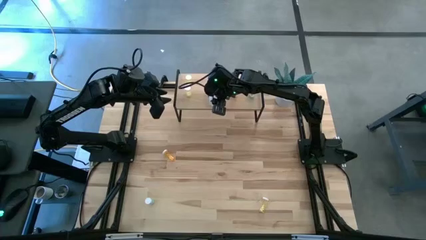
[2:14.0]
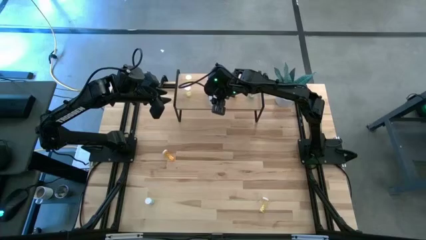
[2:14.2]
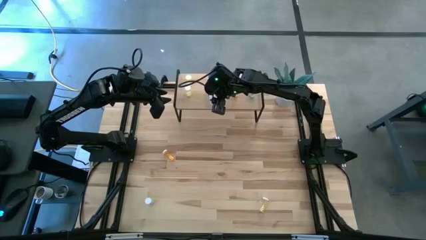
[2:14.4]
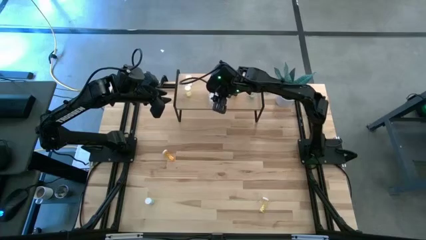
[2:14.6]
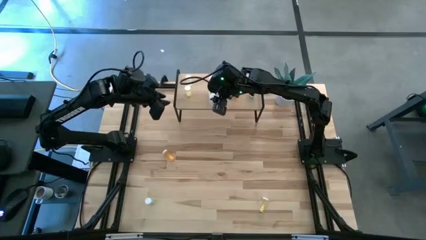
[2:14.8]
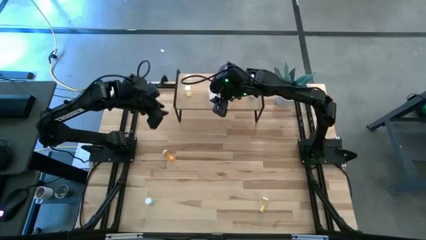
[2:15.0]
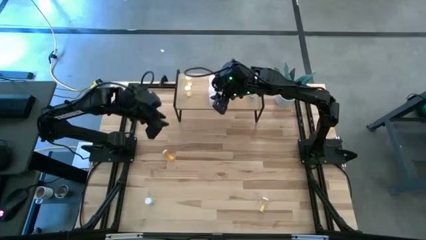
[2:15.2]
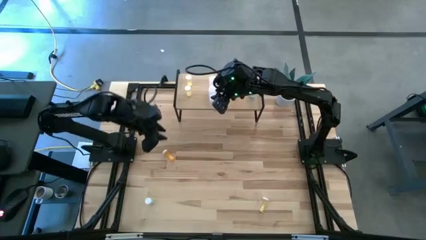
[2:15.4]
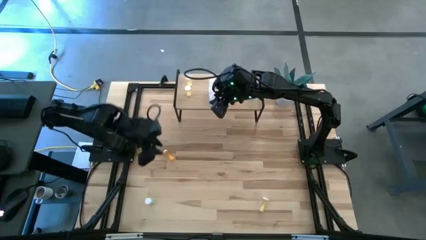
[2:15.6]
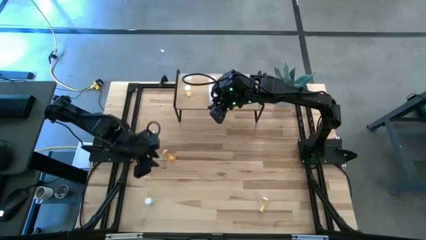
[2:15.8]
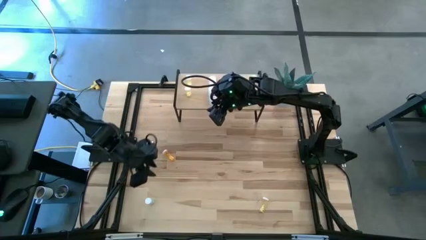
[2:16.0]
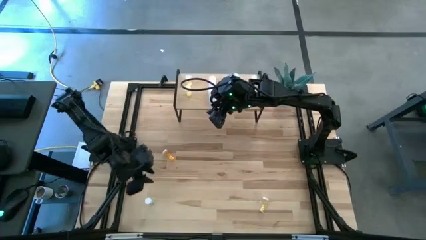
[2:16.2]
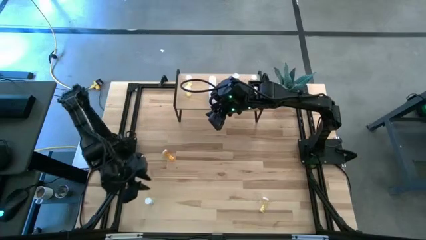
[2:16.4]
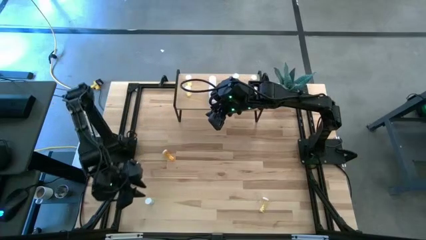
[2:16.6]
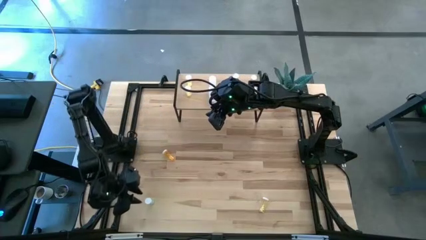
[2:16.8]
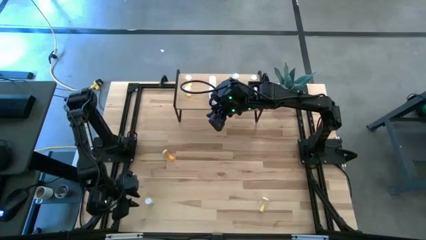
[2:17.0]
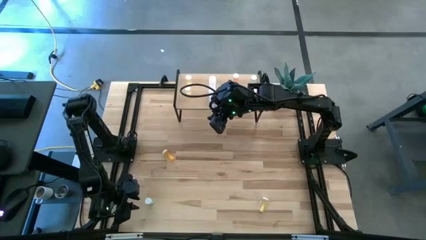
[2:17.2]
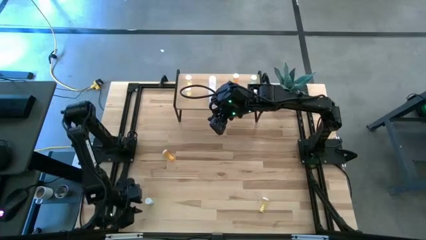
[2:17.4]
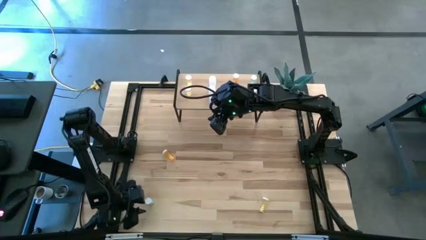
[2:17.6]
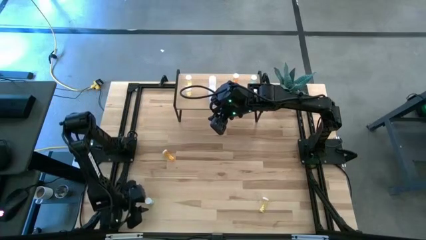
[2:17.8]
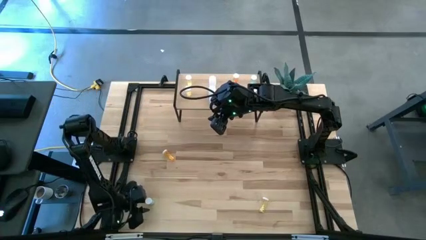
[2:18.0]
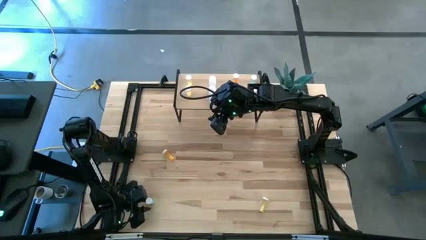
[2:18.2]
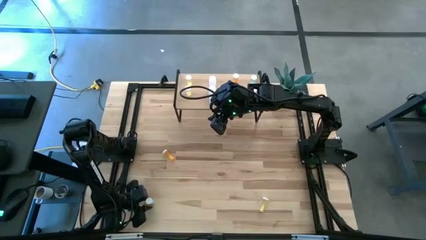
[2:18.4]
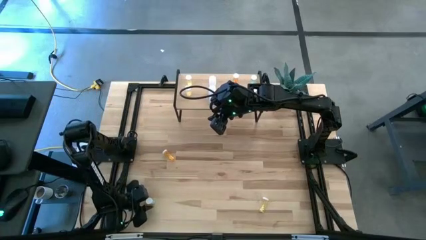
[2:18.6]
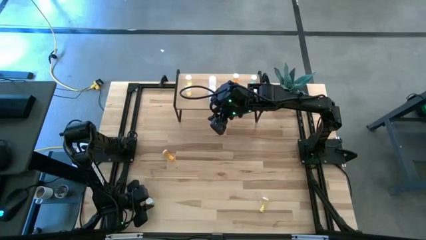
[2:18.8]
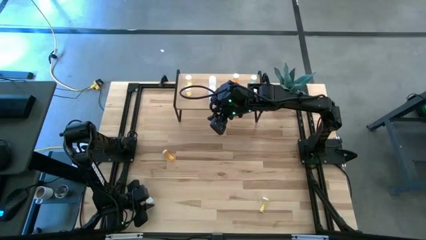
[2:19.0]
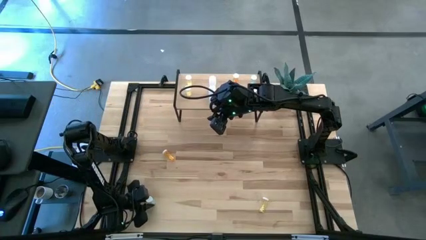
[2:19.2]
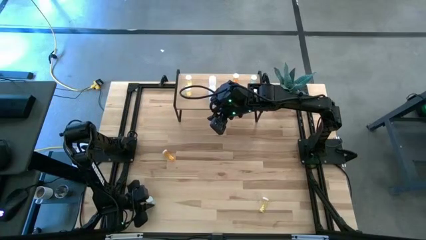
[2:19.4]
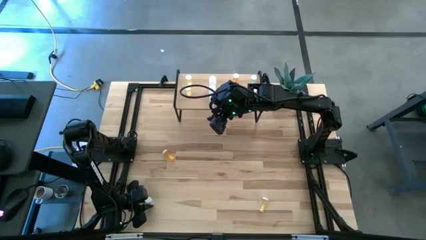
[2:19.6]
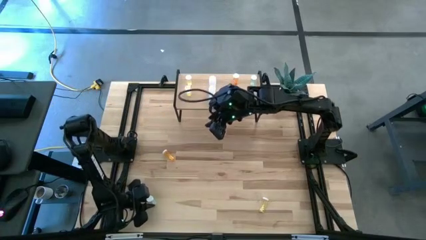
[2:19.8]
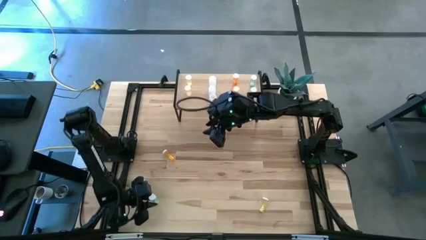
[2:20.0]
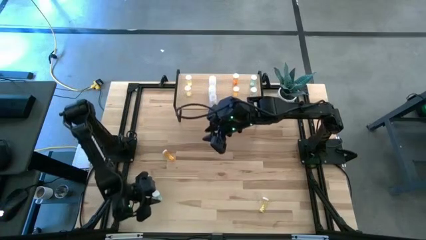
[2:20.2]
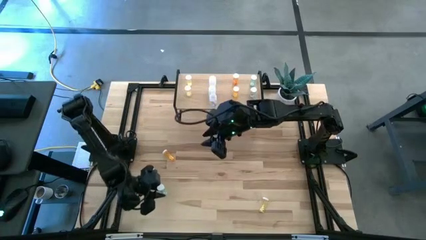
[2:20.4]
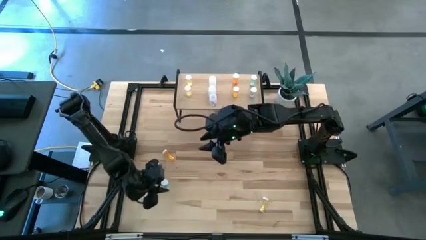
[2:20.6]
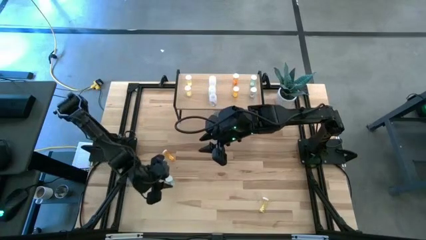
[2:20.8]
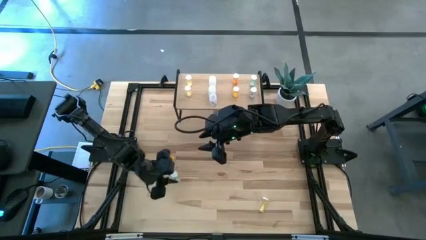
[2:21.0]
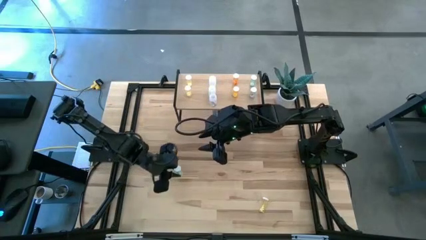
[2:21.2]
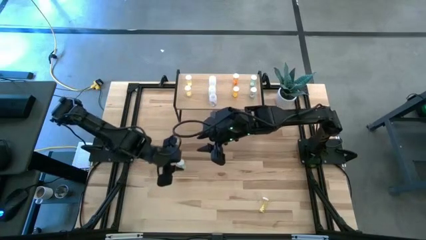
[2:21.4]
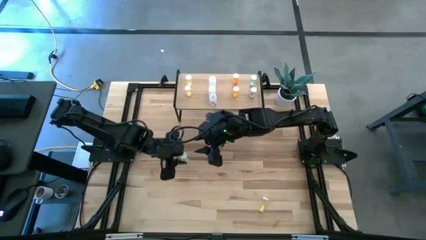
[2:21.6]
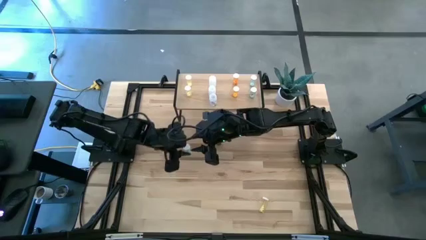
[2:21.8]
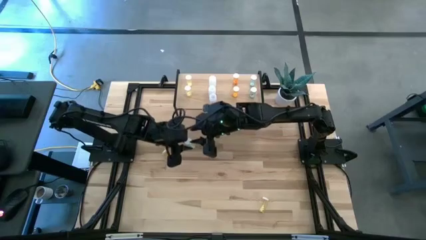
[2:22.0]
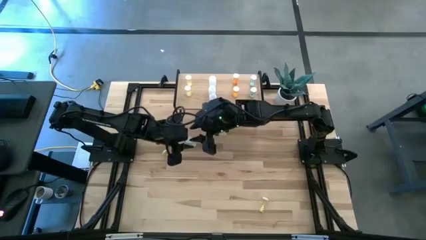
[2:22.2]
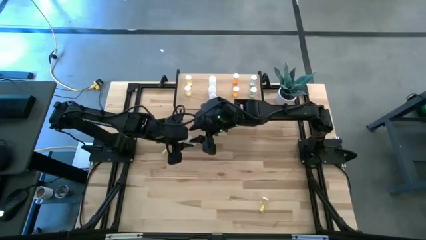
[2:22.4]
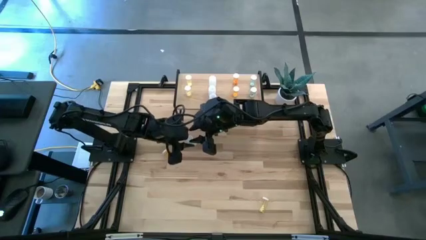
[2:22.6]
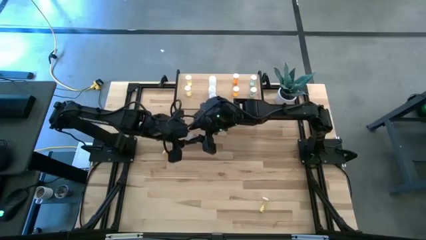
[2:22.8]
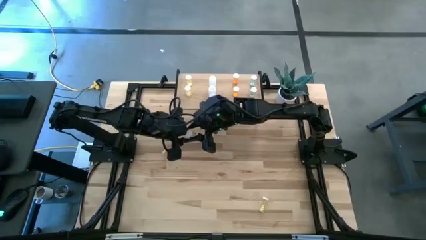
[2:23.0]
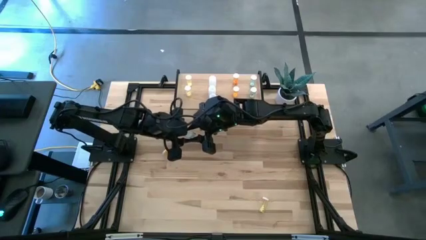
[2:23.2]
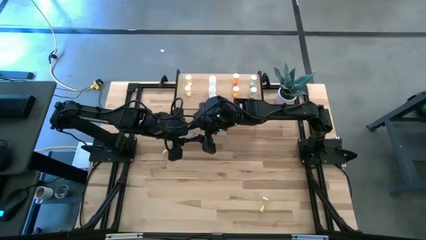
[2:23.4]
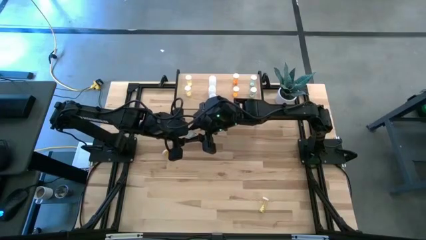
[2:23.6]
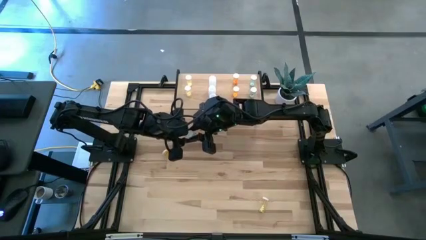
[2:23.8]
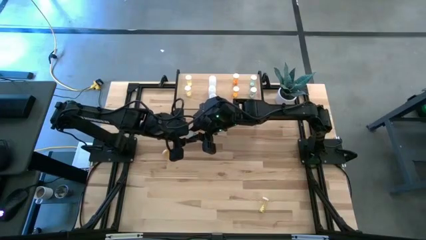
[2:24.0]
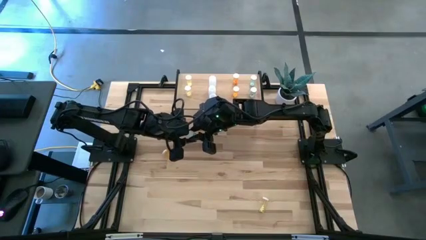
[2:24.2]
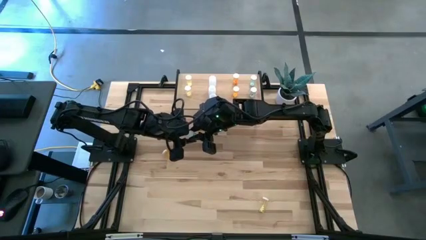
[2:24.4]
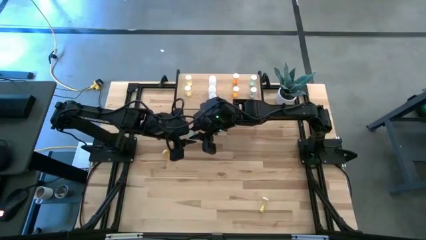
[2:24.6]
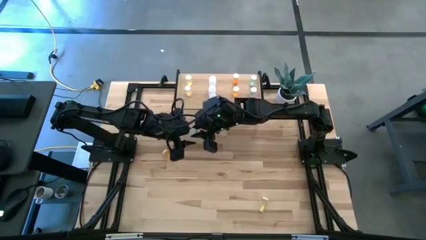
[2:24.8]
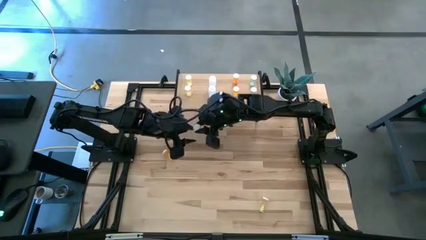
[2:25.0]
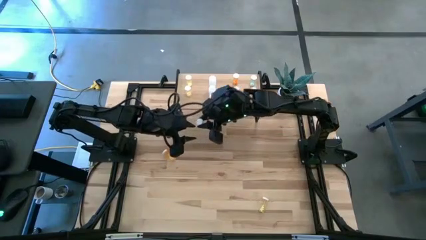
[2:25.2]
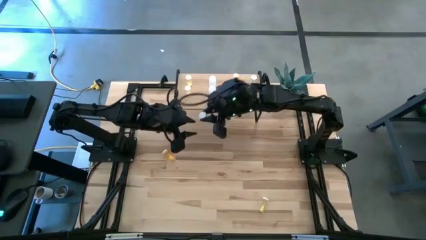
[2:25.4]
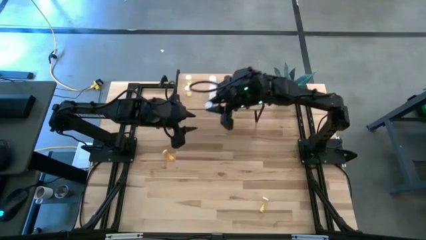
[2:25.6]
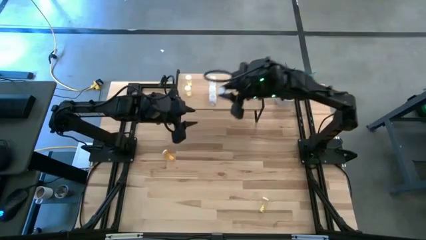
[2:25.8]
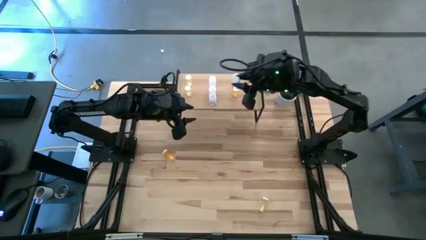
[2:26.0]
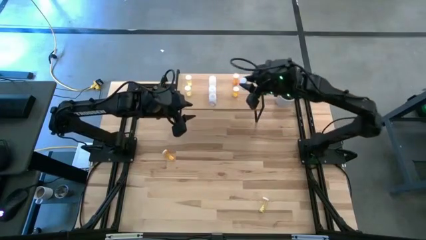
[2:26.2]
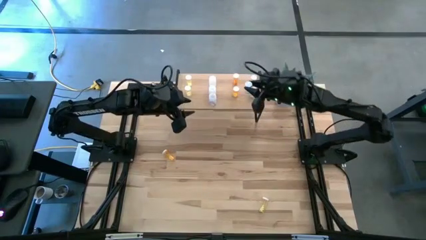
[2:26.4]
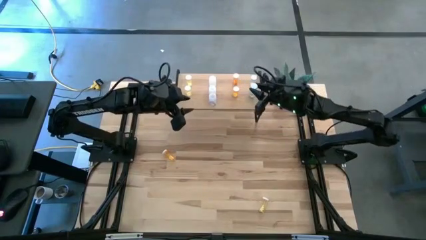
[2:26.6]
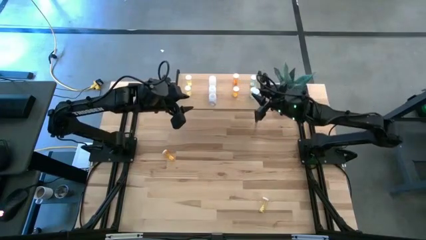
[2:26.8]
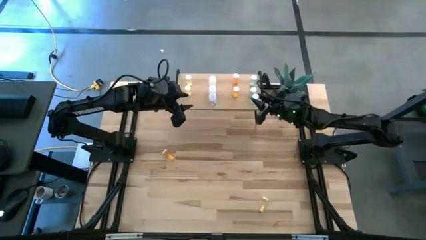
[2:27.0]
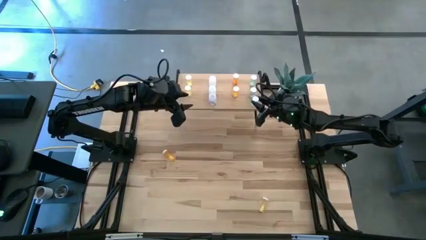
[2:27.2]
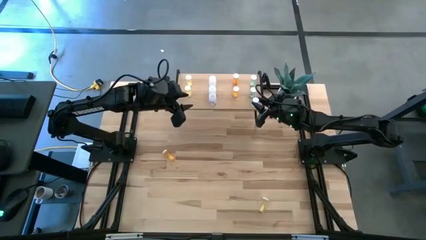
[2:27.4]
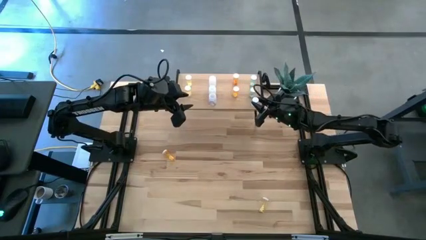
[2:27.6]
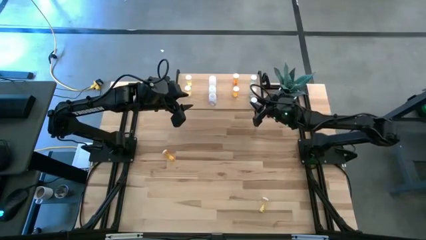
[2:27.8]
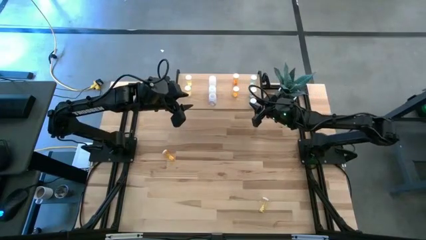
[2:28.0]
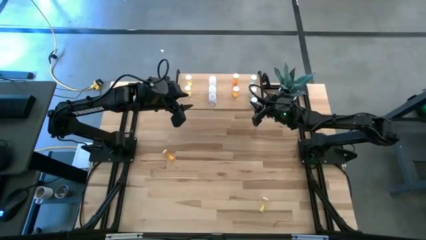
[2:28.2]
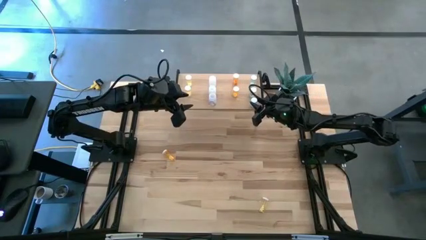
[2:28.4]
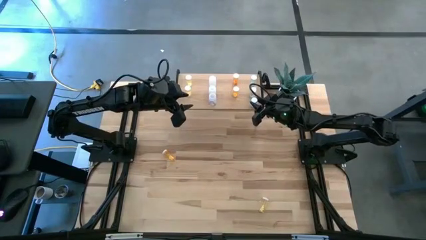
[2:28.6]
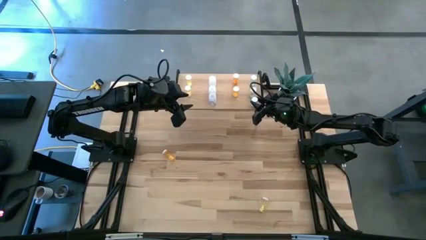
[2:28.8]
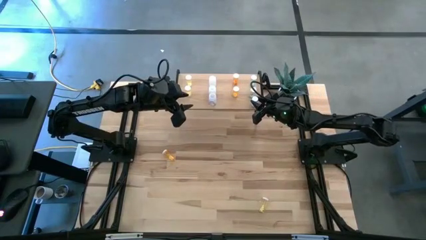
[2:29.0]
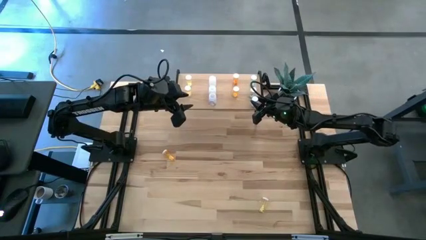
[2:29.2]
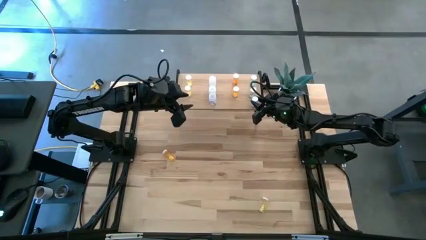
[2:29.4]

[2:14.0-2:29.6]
Task: Pick and place medicine bottles onto shelf by color
Put the blue medicine bottle on the shelf aligned with the other blue medicine bottles

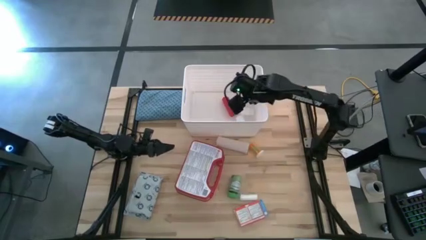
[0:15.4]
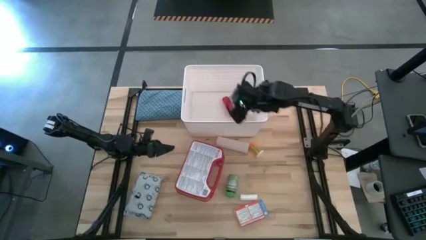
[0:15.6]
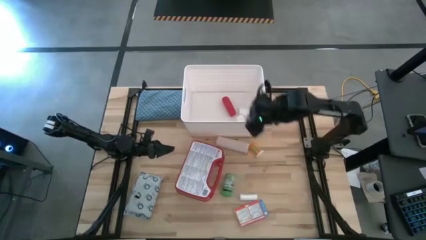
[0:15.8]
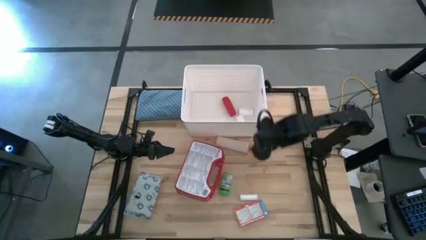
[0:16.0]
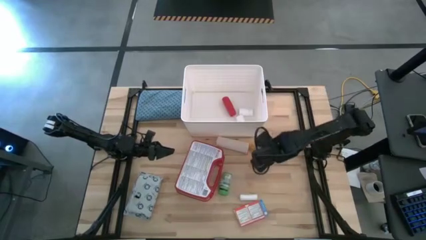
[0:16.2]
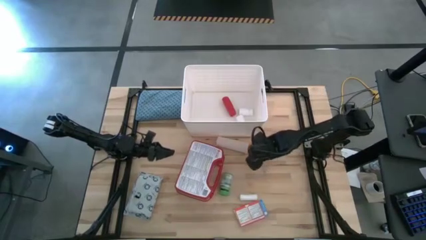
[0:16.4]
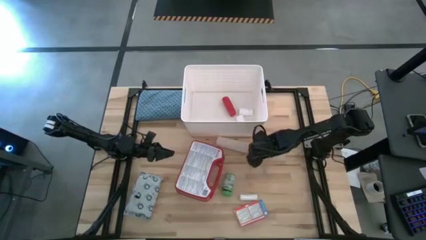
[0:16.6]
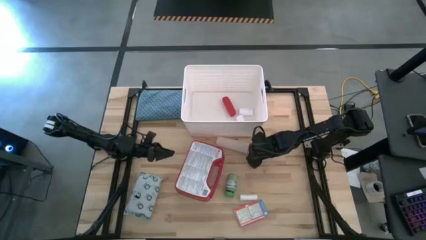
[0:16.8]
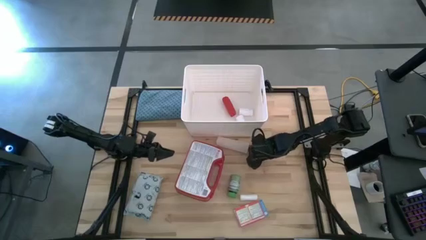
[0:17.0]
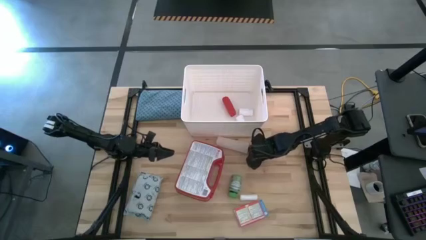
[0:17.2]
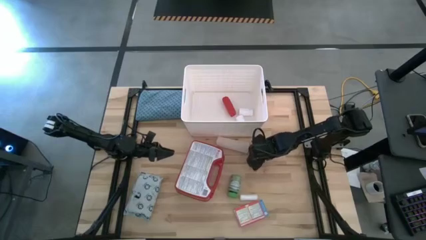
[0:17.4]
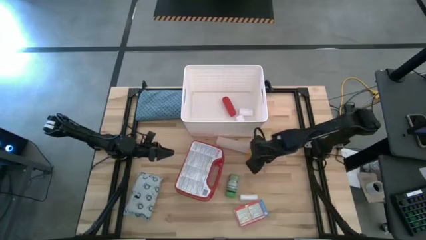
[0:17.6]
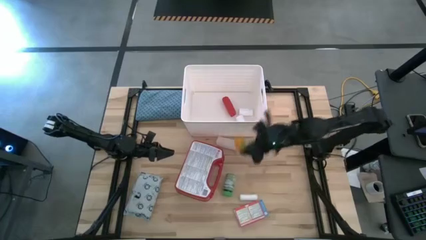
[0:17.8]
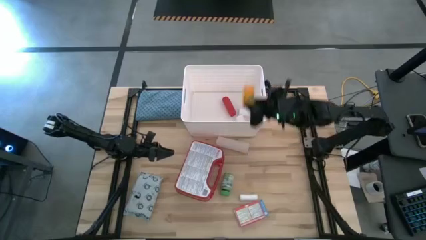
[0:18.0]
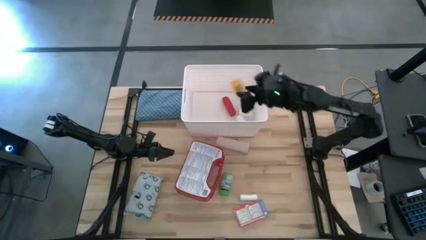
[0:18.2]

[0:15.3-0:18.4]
Task: Pick & place medical supplies in basket/bin
Put the orange pill bottle into the white bin
